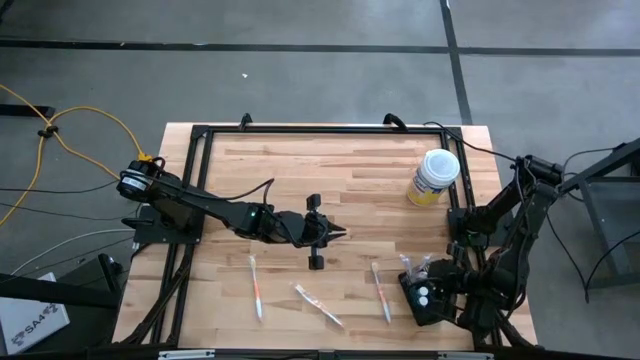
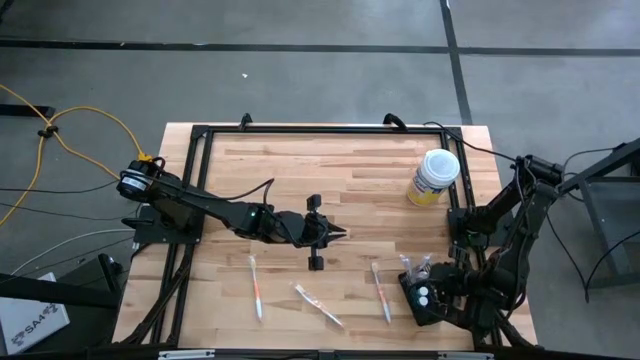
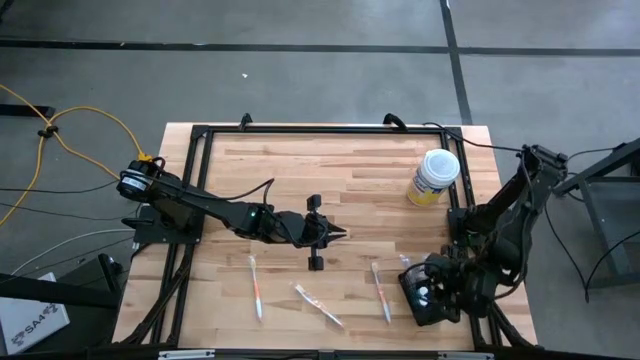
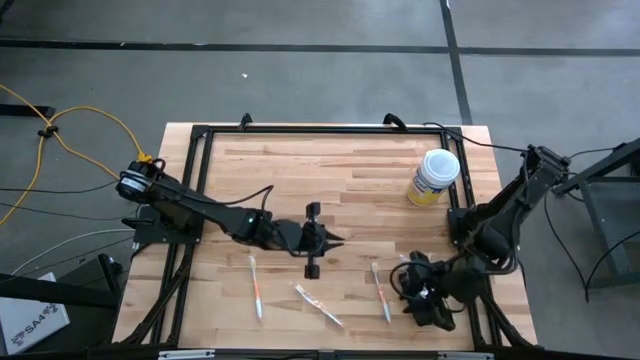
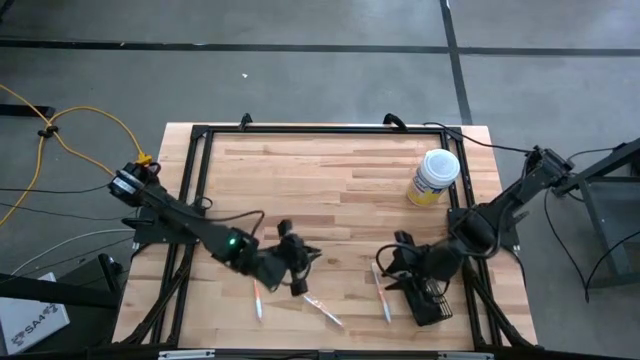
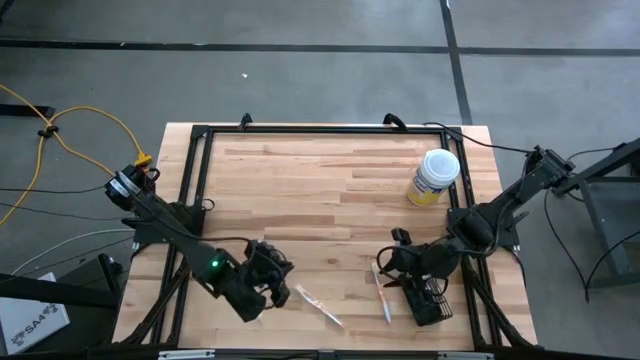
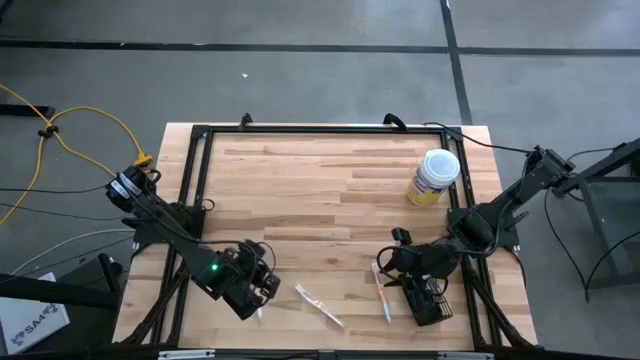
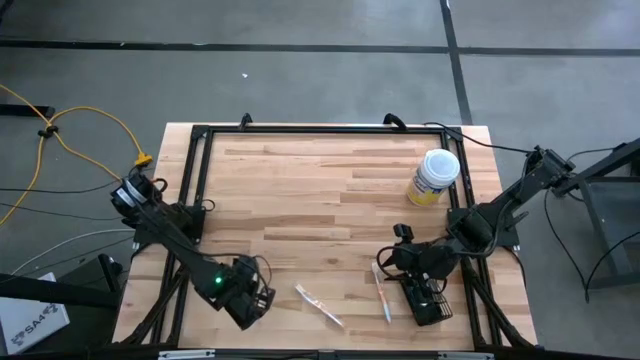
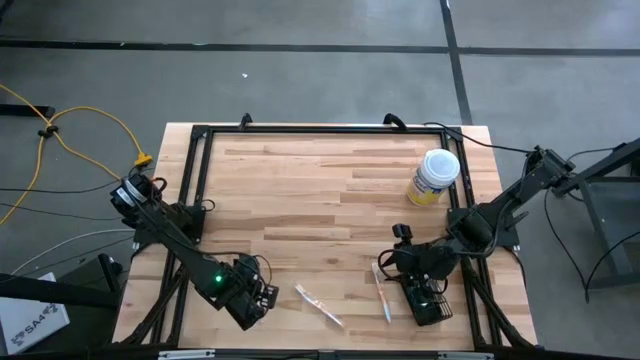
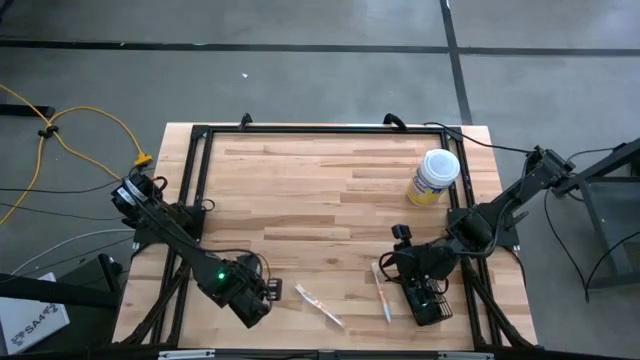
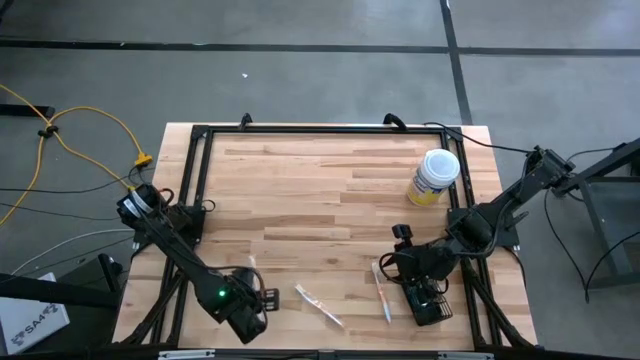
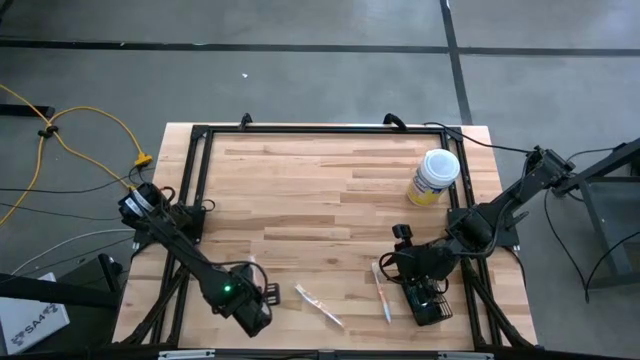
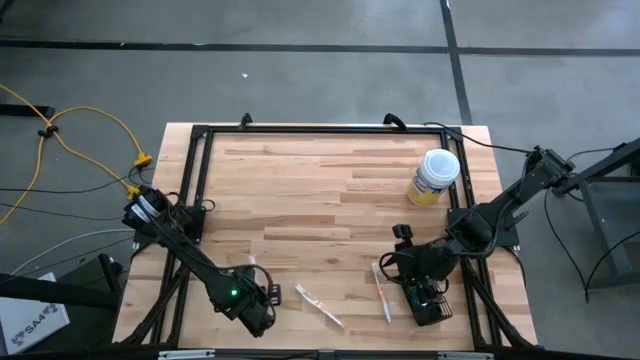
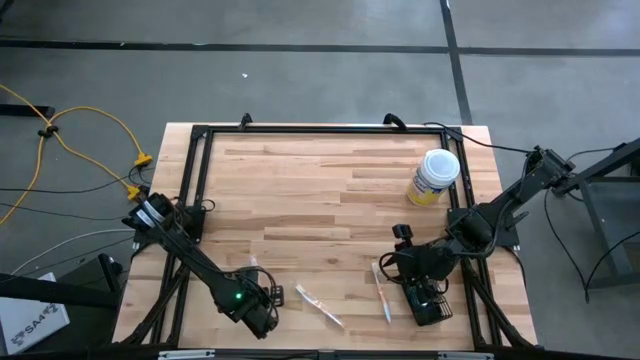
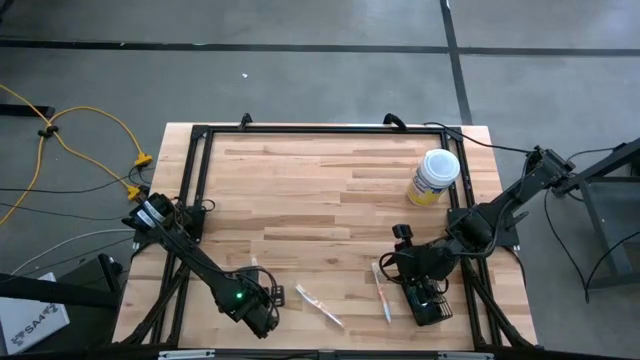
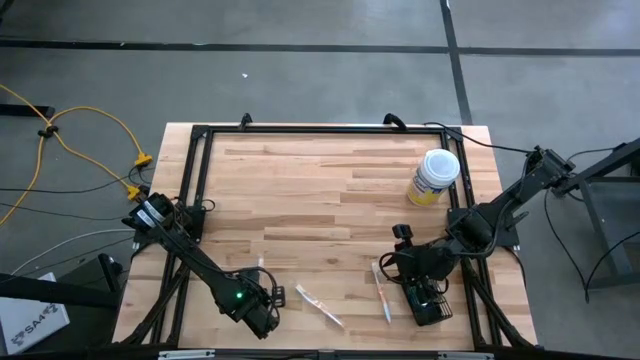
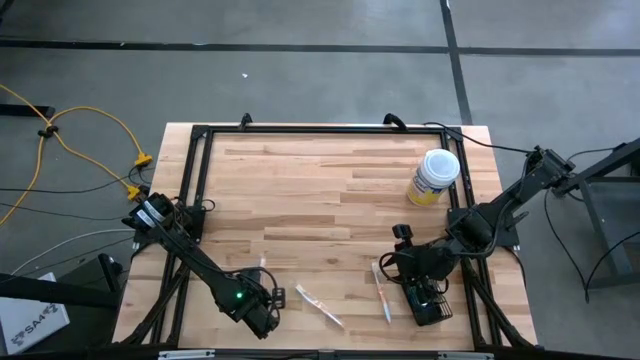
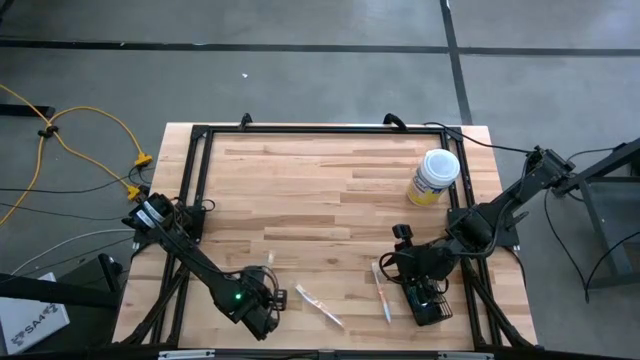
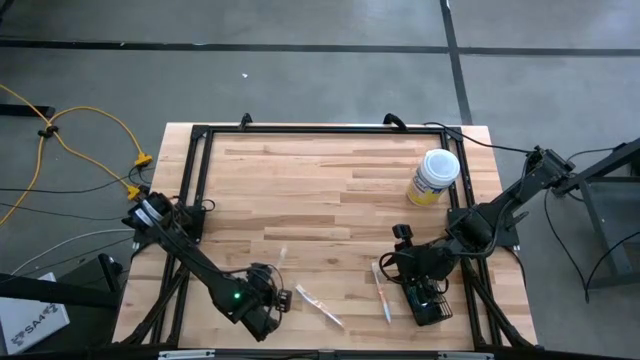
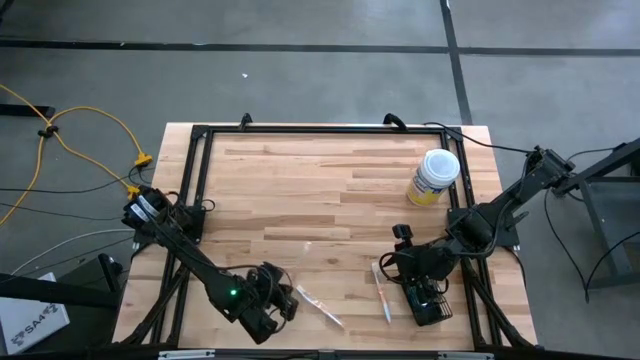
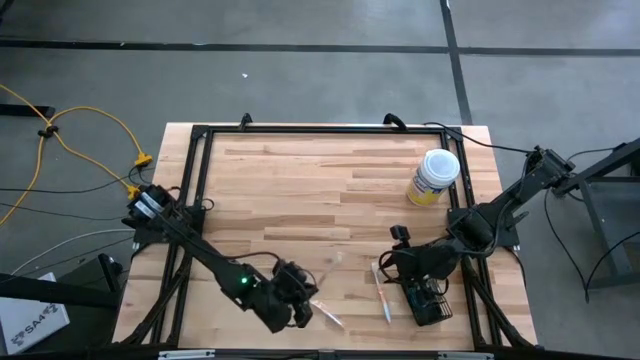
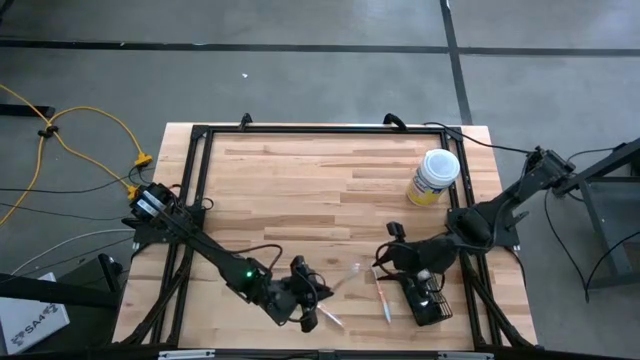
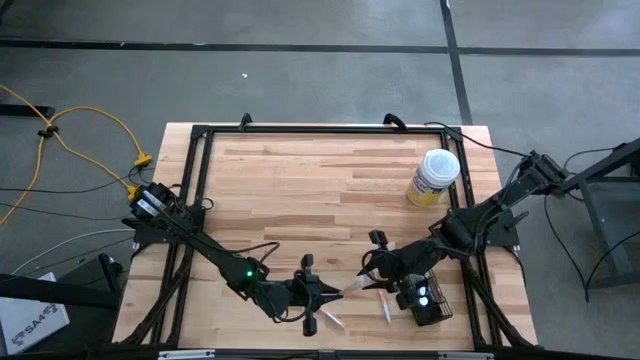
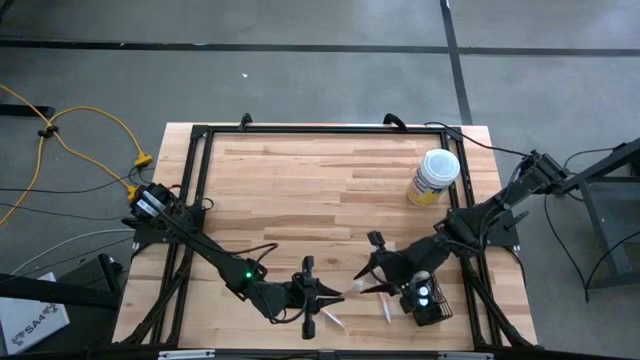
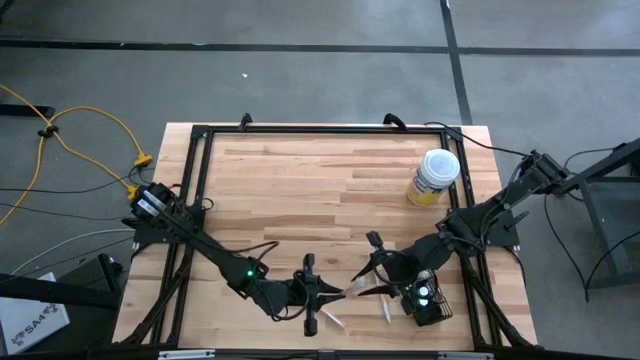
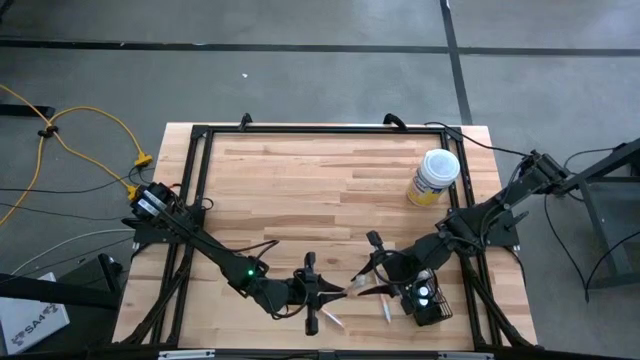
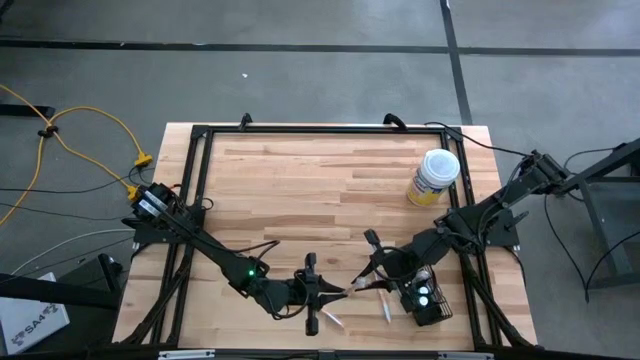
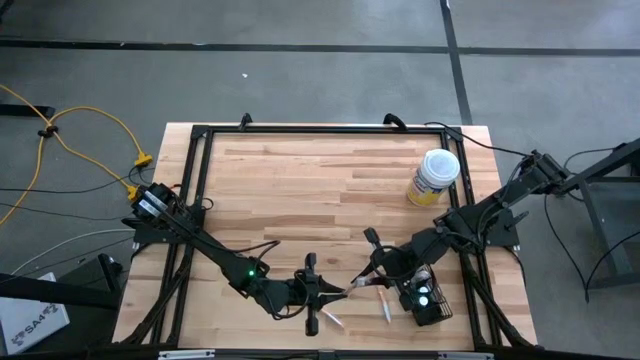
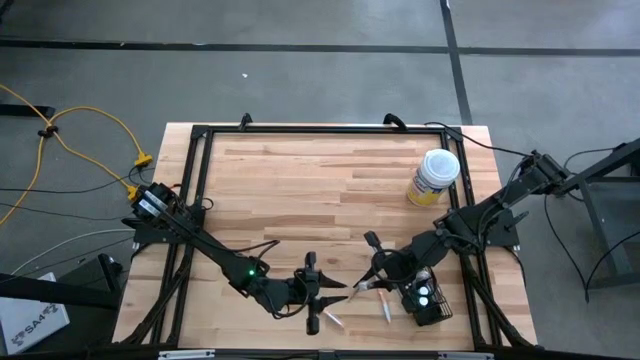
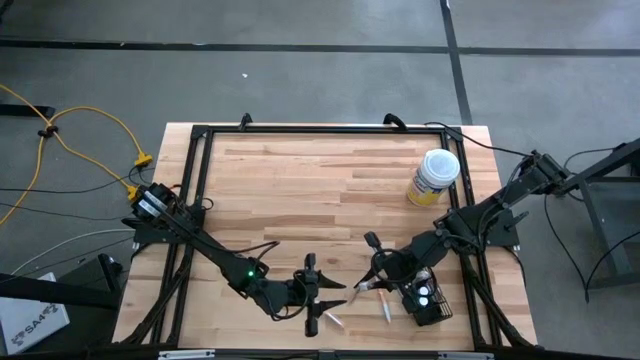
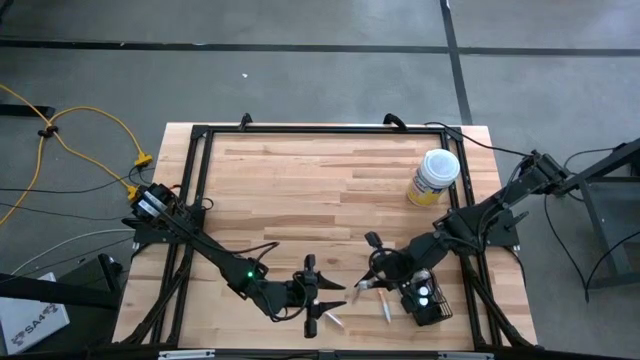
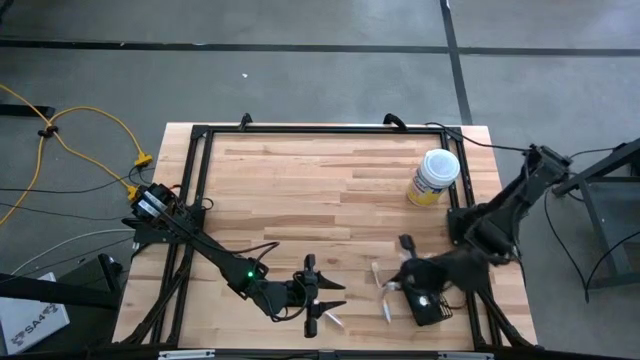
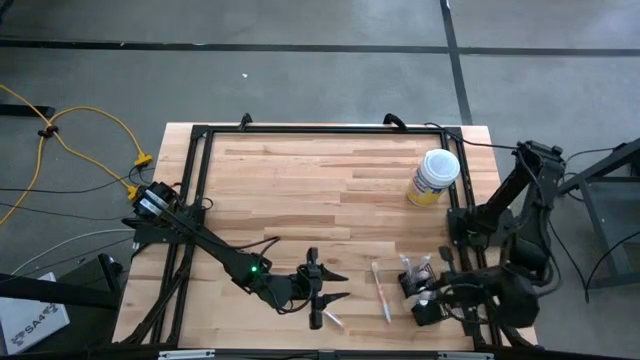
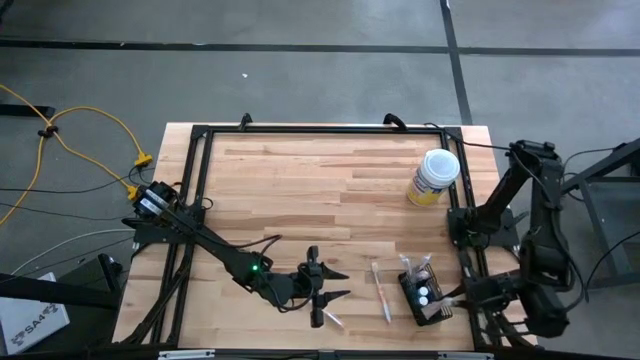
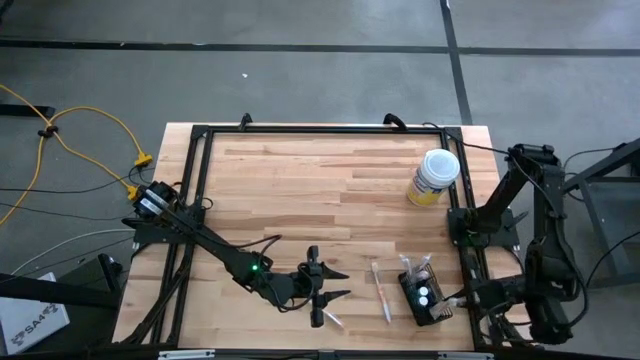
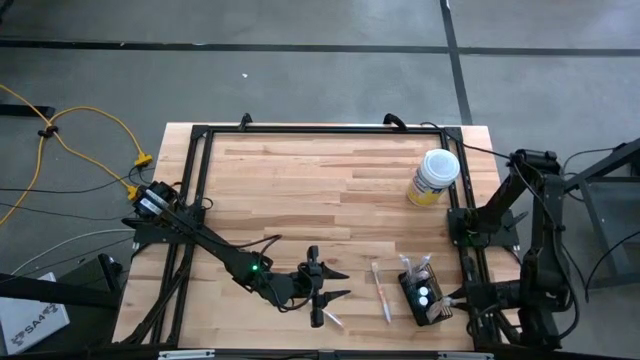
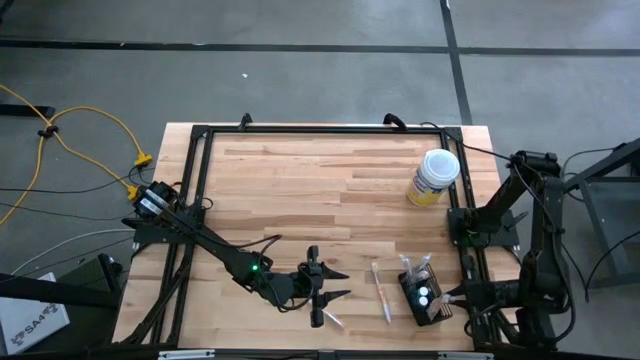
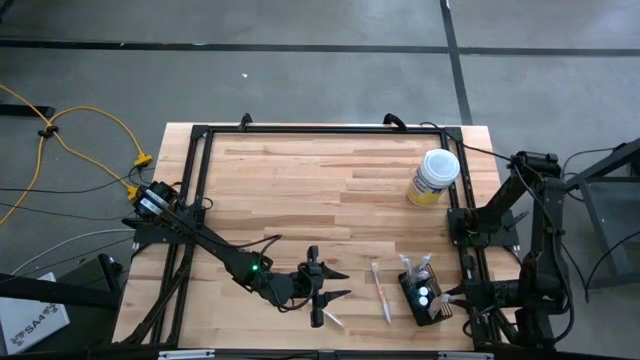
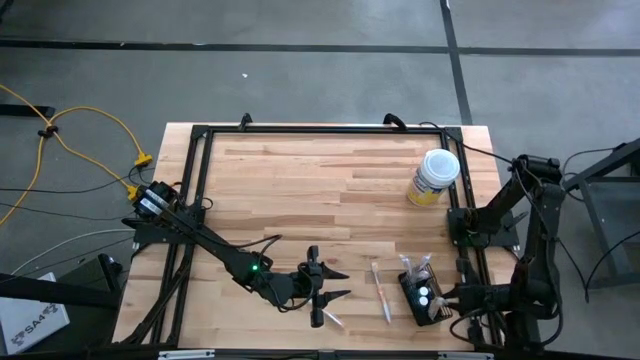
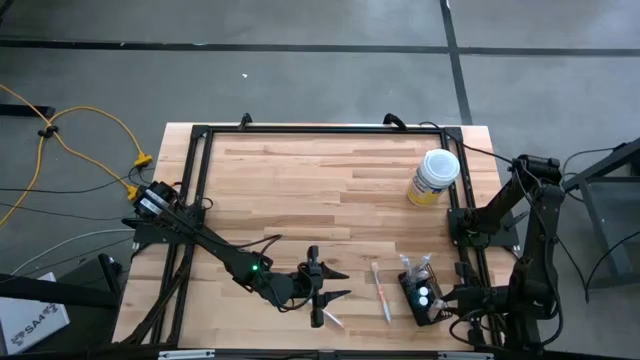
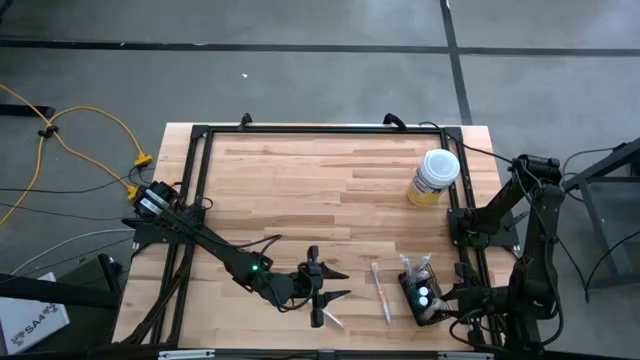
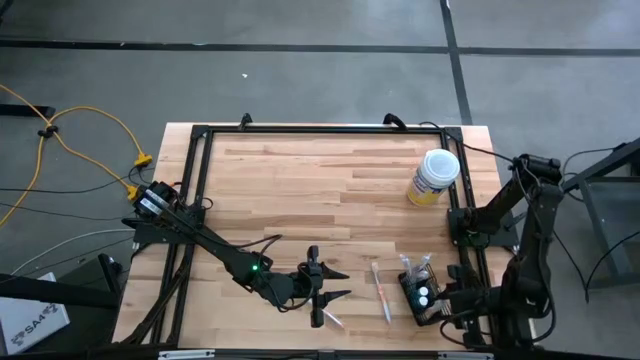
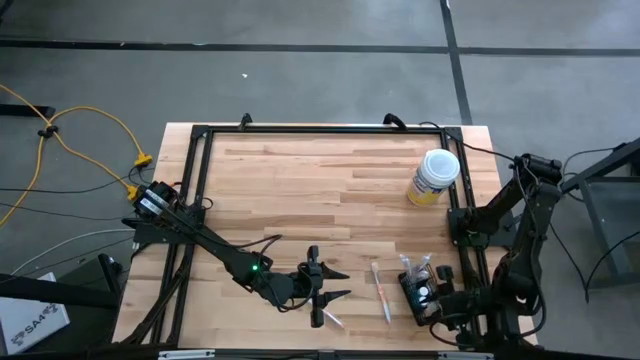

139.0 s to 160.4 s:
Task: Pick & Place toothbrushing station
Put the orange toothbrush into the mesh organizer
